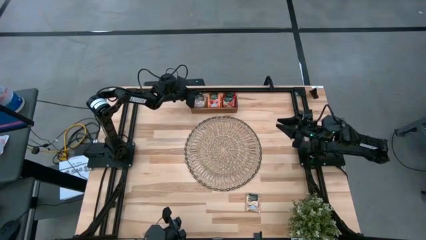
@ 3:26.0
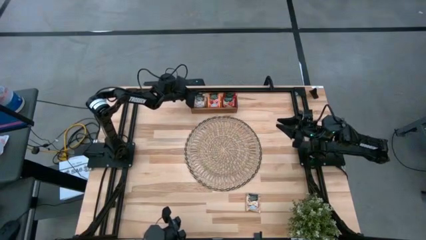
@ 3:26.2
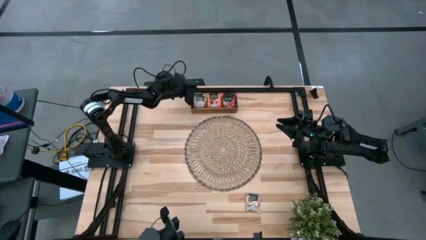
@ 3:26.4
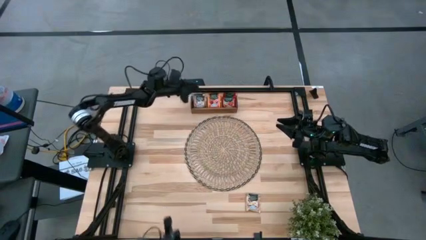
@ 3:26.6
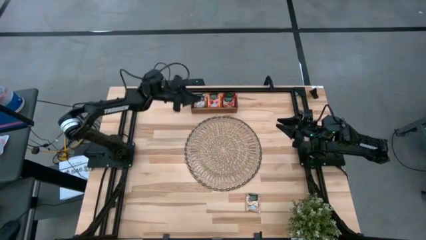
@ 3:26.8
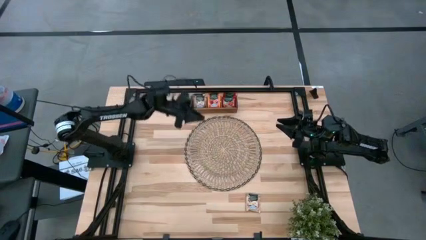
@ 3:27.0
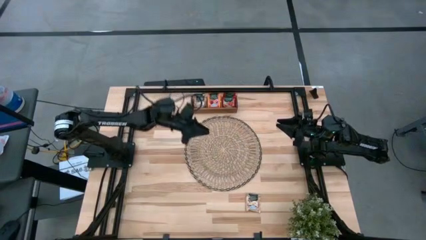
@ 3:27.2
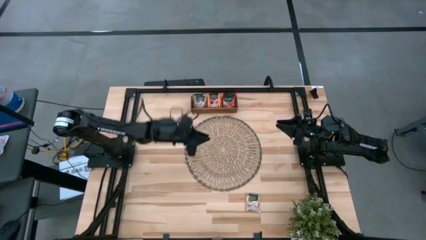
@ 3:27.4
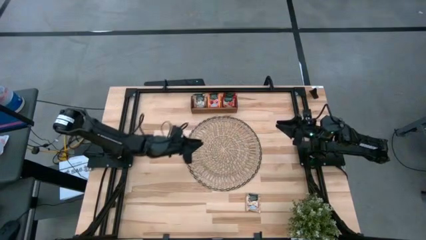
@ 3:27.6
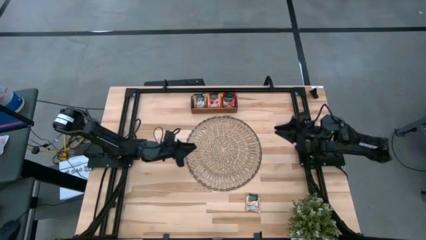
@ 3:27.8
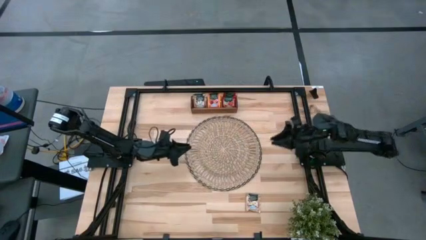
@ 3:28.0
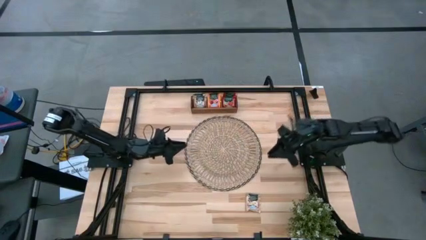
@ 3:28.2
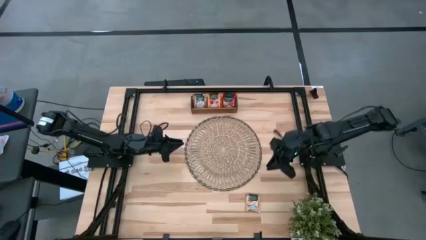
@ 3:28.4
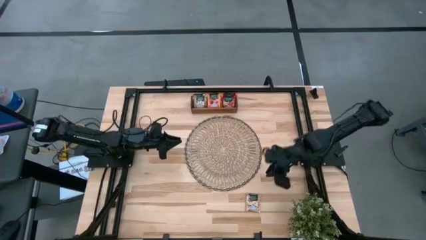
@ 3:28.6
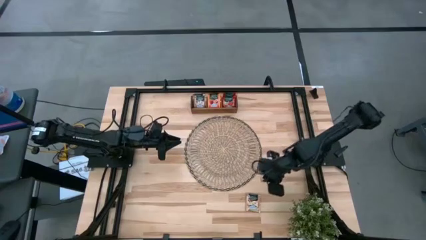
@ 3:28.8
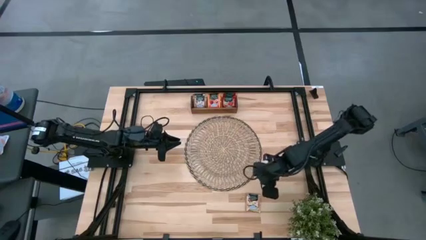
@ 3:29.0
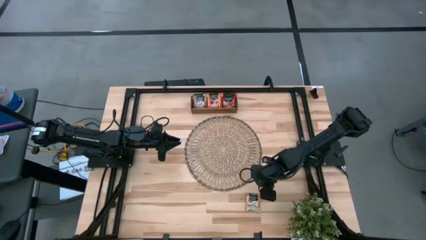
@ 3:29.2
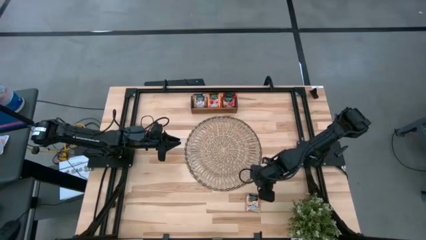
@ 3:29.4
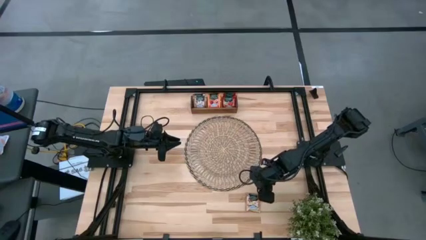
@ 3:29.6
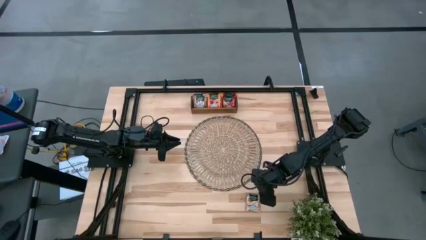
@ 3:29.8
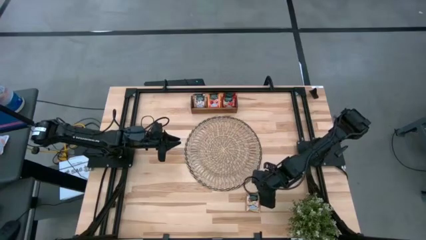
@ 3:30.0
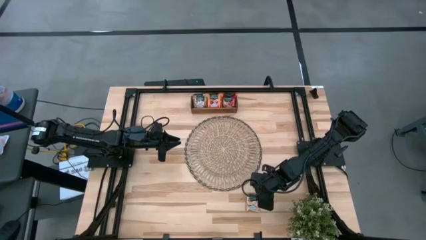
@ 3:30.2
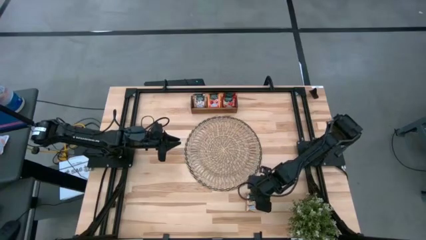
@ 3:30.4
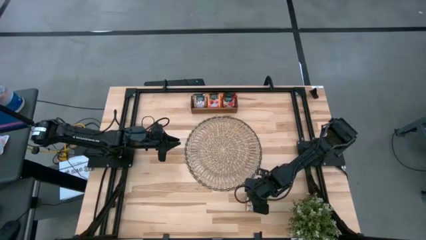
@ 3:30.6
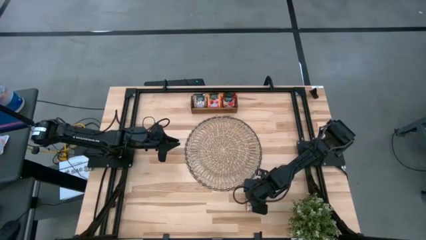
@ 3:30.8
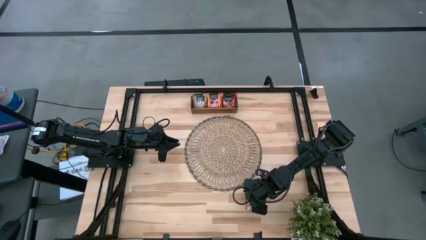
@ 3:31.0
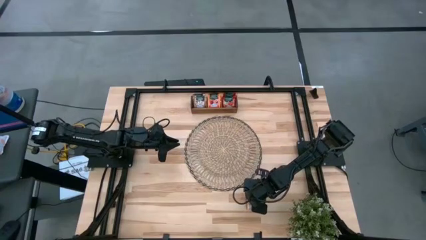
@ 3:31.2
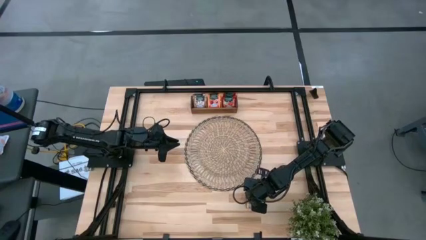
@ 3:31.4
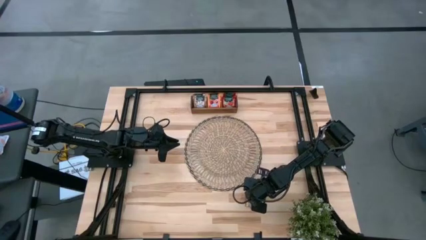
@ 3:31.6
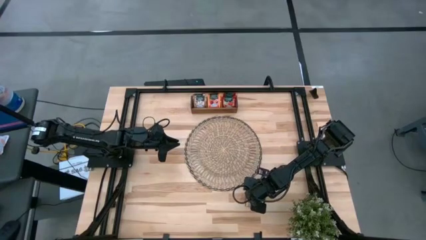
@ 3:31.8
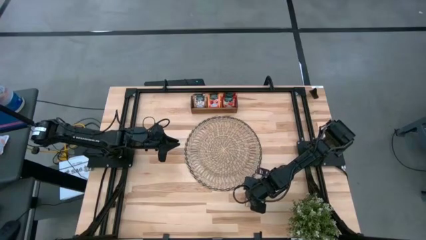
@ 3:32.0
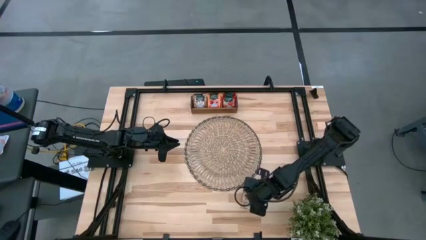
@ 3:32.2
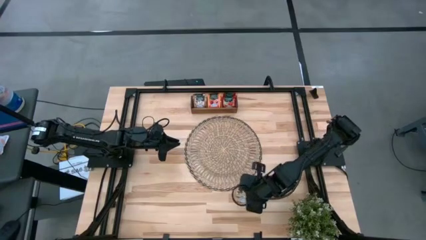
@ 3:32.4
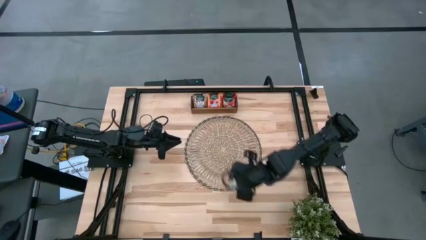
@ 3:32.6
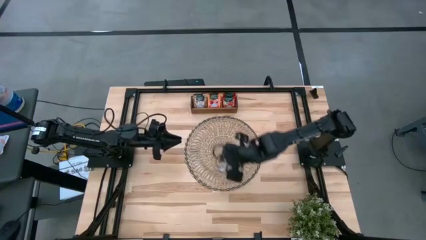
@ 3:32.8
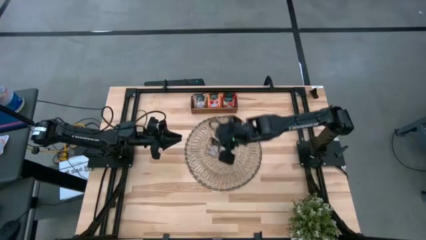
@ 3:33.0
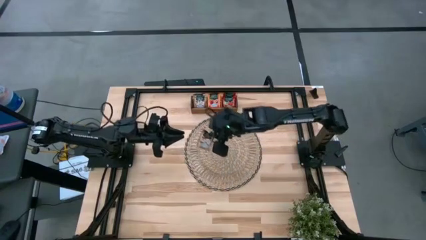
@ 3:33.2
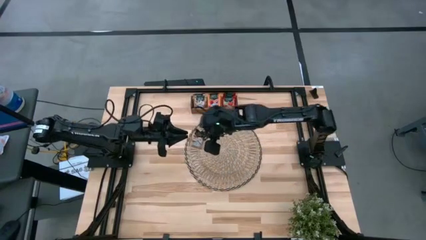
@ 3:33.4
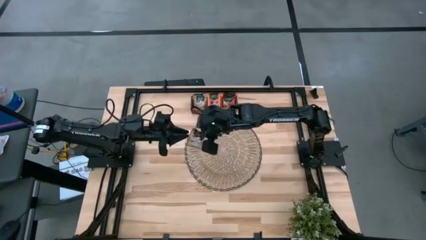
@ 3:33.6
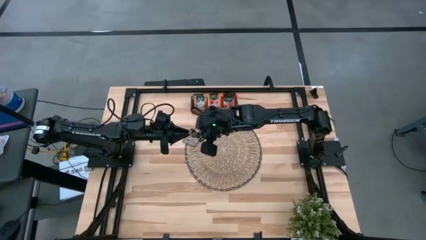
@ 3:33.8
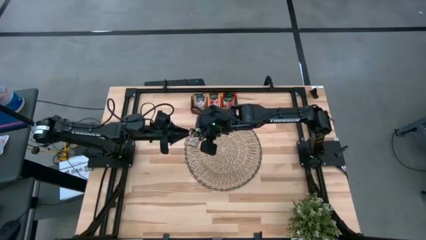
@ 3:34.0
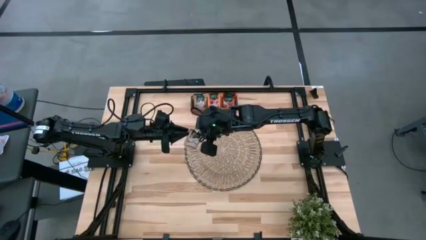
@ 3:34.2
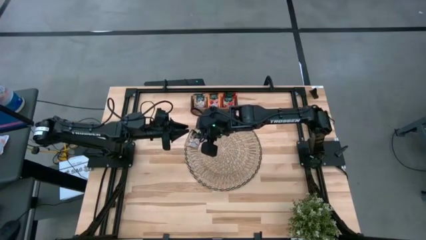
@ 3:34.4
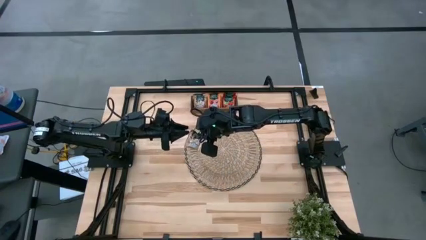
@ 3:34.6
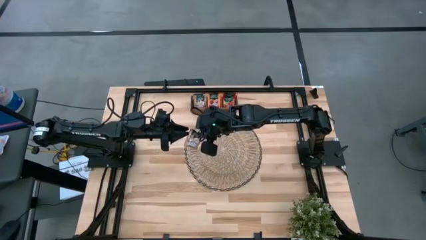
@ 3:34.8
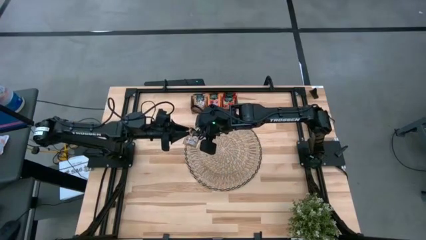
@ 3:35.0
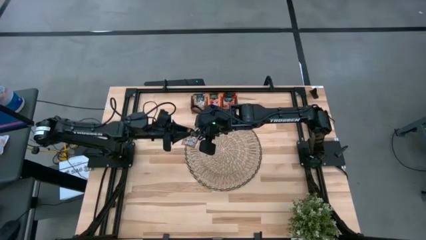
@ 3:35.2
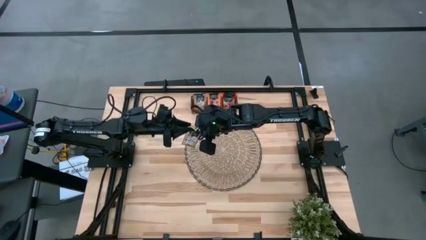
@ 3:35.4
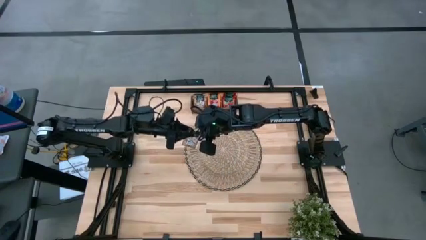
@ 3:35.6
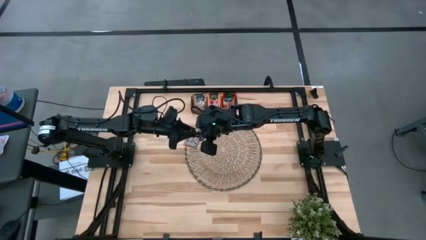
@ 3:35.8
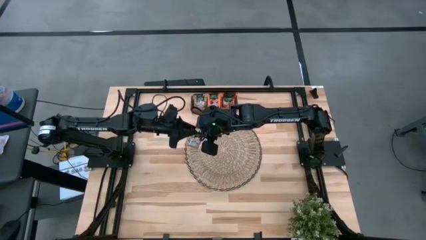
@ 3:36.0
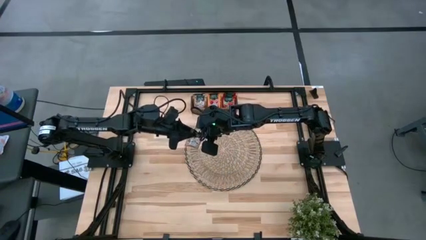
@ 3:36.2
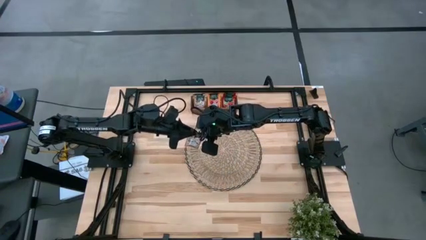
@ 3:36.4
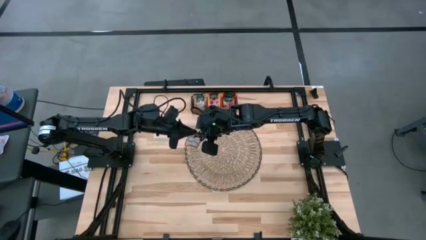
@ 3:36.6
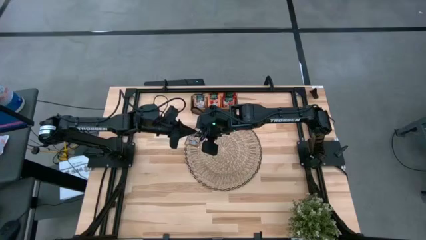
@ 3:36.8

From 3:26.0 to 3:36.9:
Task: Pick & Place Tea
Put the brown tea bag into the left section of the wooden organizer
